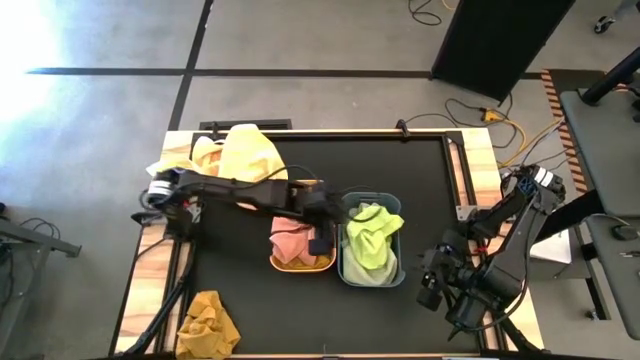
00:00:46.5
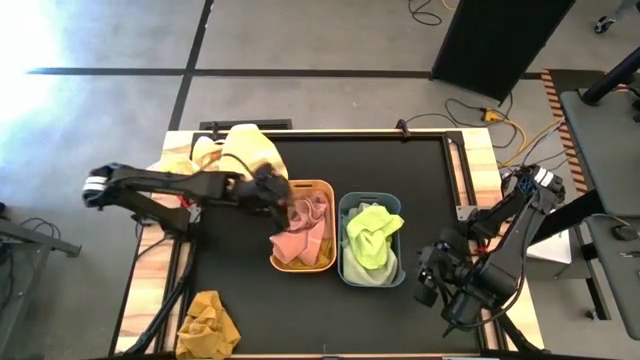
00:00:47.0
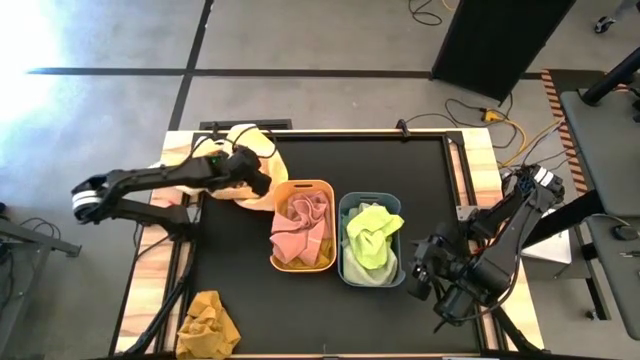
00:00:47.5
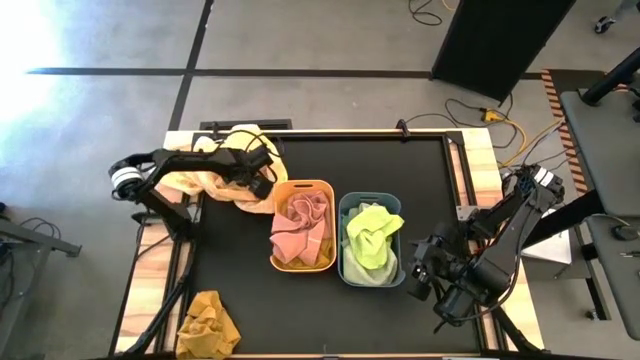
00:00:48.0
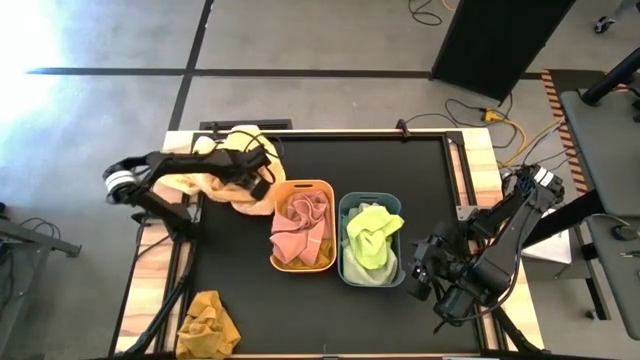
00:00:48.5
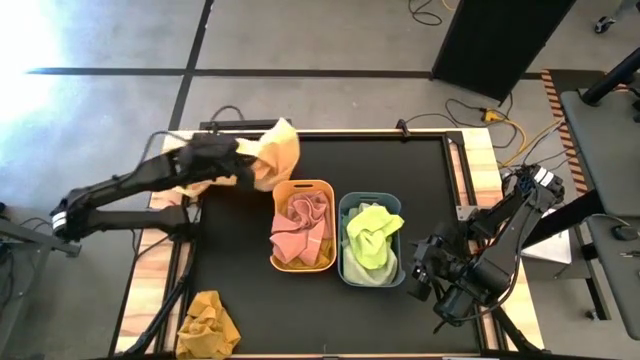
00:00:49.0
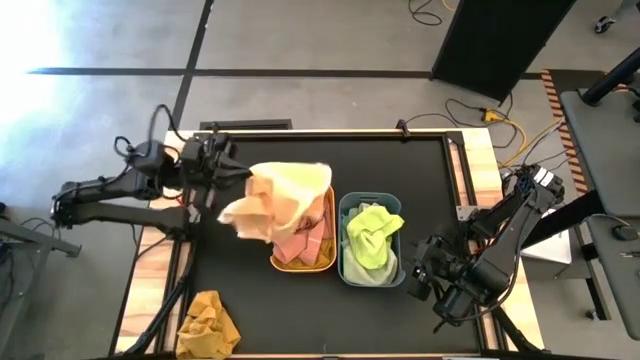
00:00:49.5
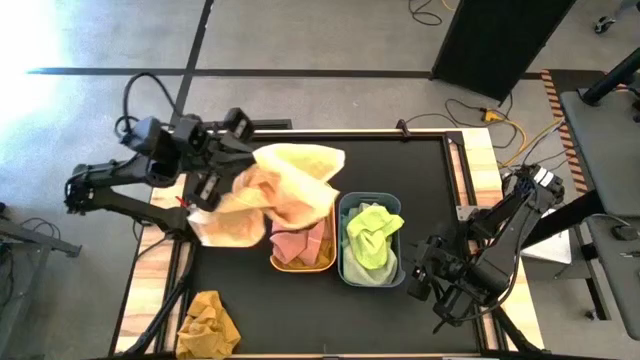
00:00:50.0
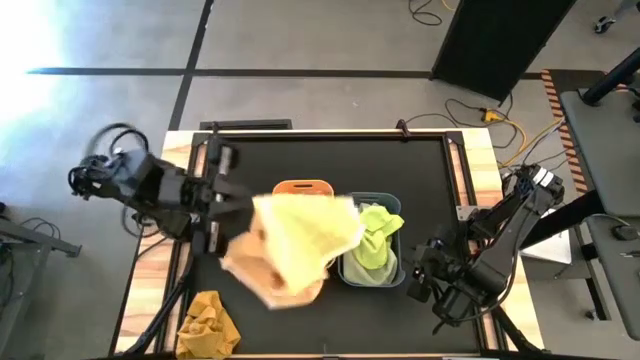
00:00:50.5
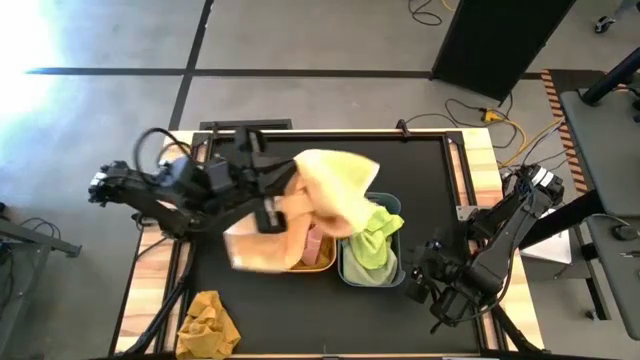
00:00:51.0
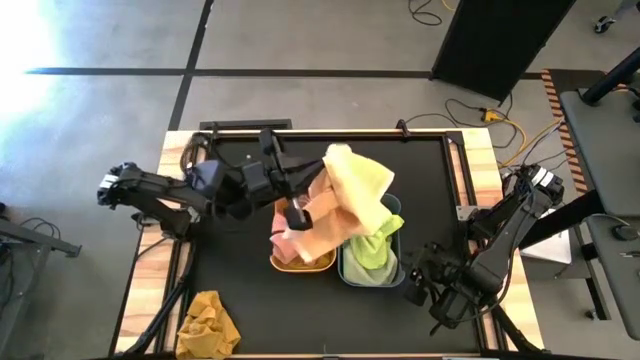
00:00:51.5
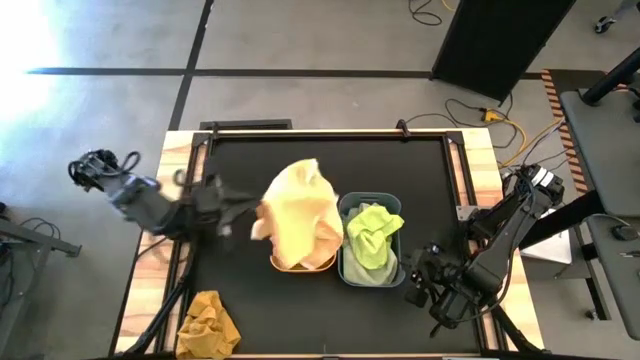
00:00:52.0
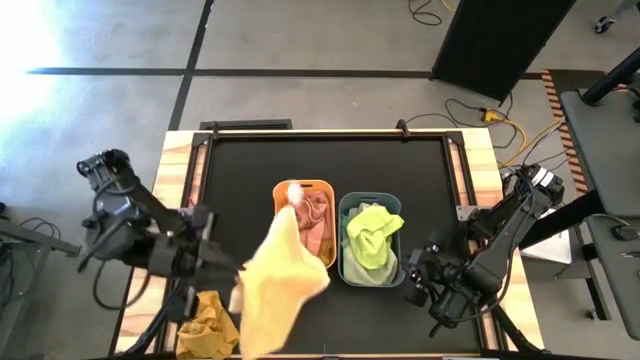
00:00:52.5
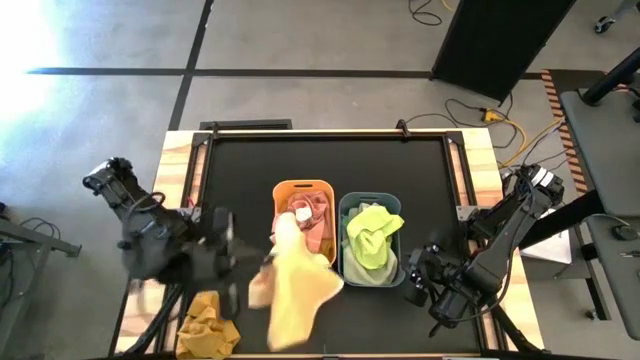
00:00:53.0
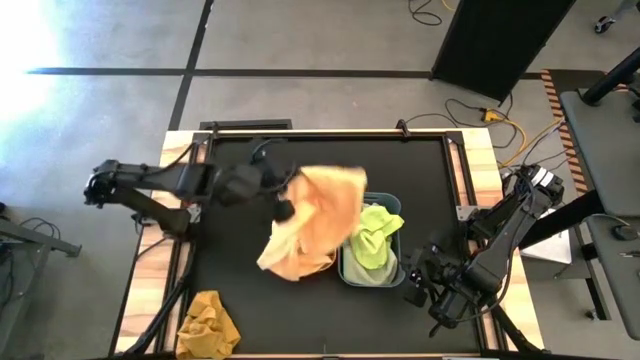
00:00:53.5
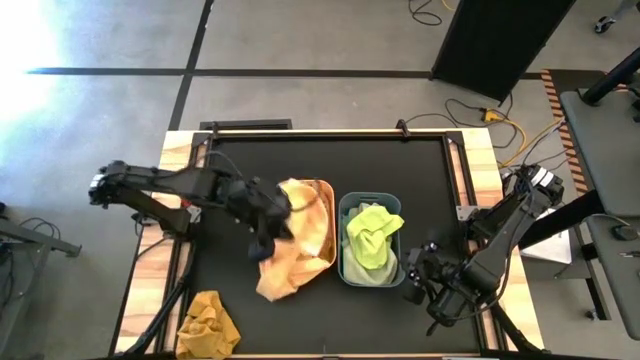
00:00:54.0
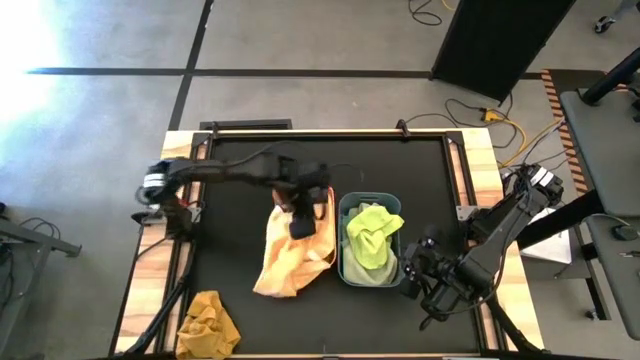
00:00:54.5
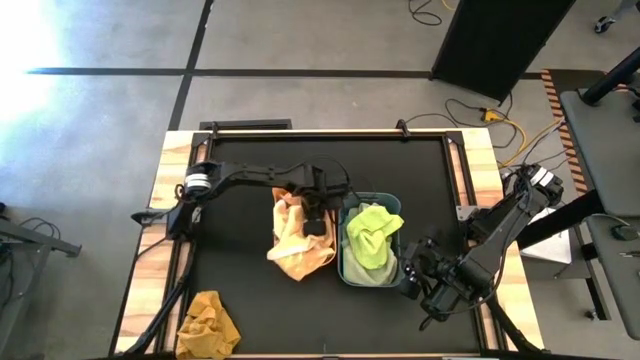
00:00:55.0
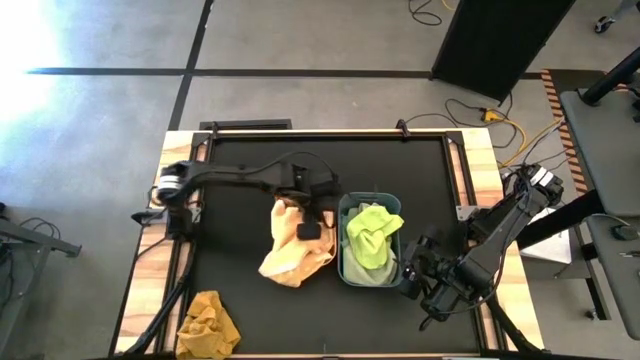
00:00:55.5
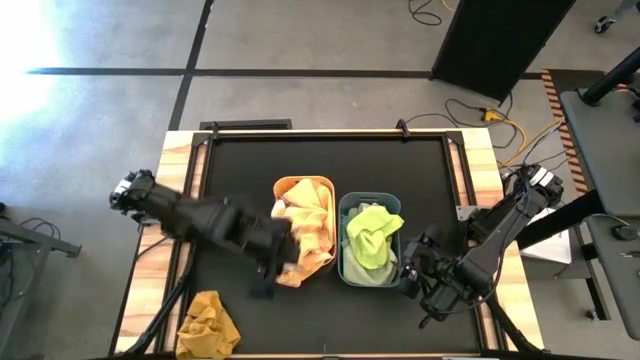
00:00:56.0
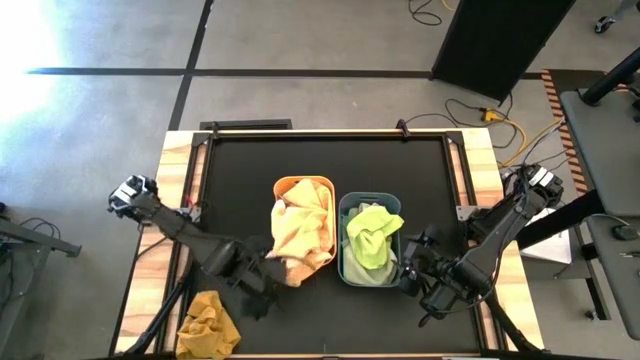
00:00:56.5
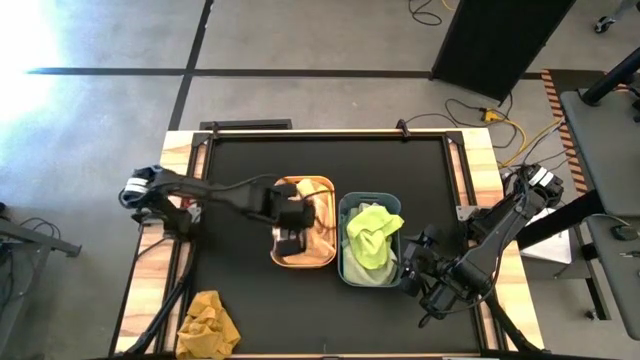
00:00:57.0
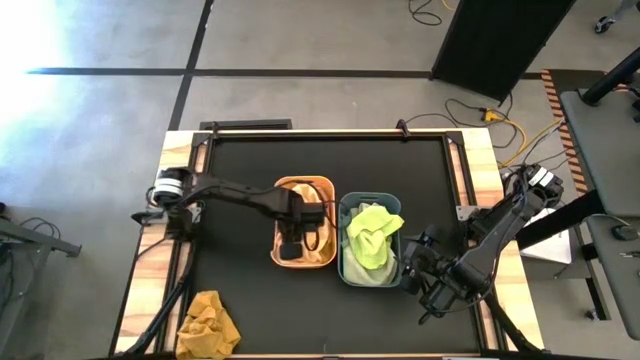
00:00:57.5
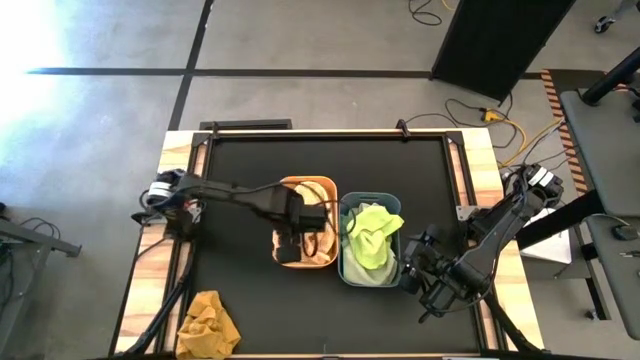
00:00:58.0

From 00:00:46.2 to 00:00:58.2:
Task: Sort towels by color in basket
Put the orange plaid towel into the orange bin

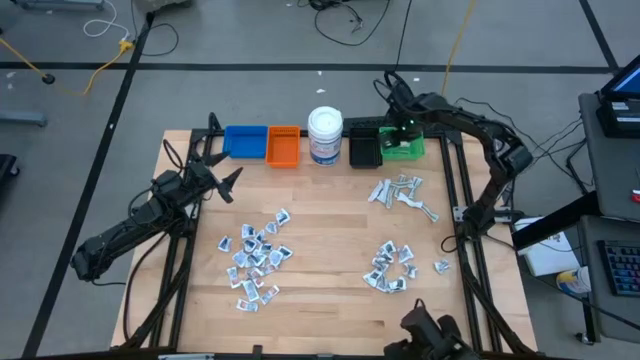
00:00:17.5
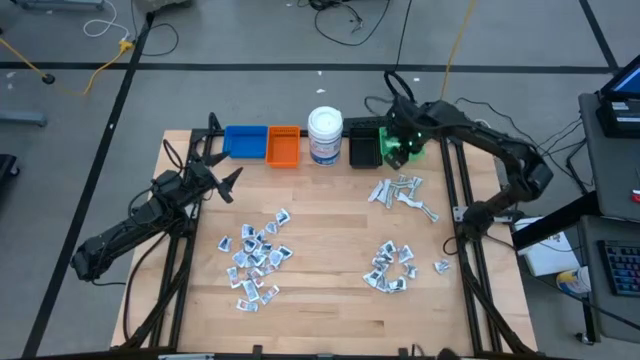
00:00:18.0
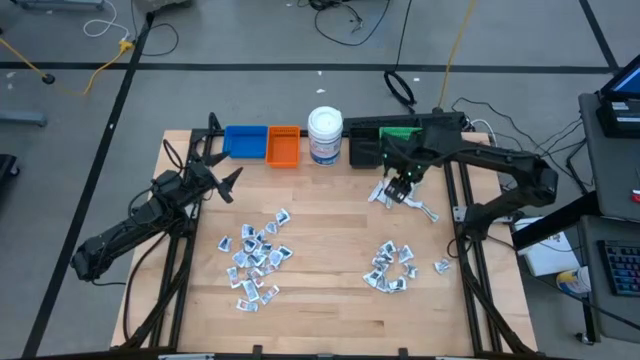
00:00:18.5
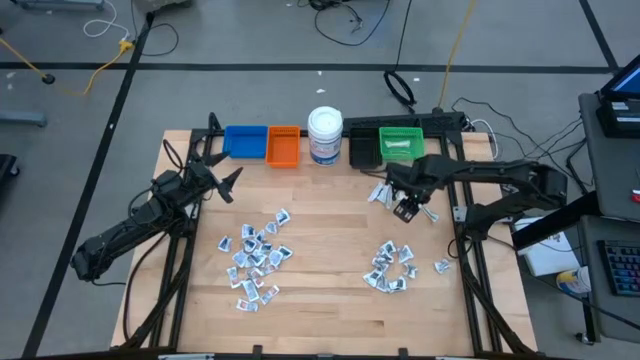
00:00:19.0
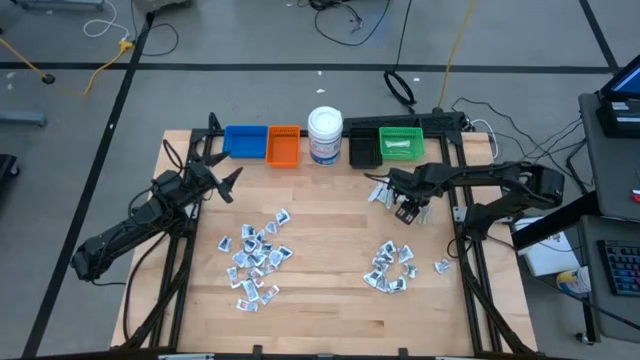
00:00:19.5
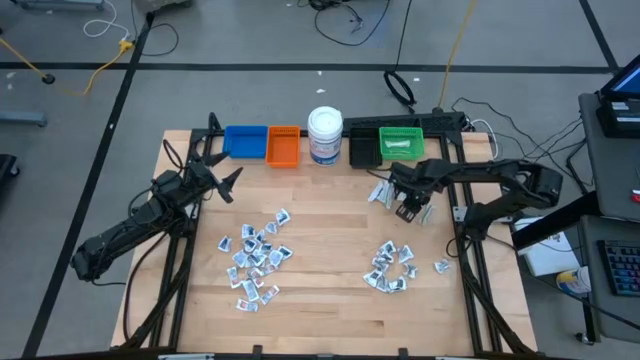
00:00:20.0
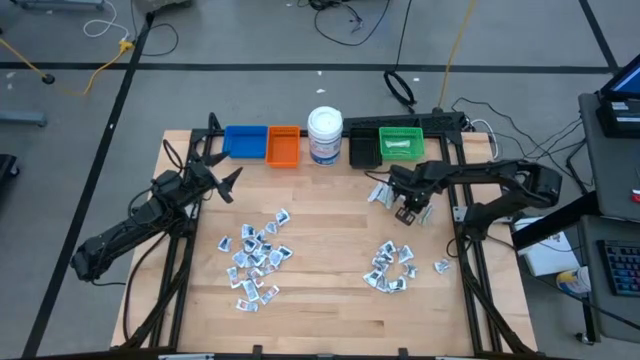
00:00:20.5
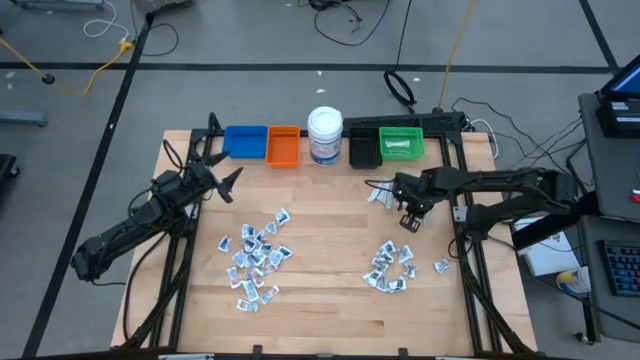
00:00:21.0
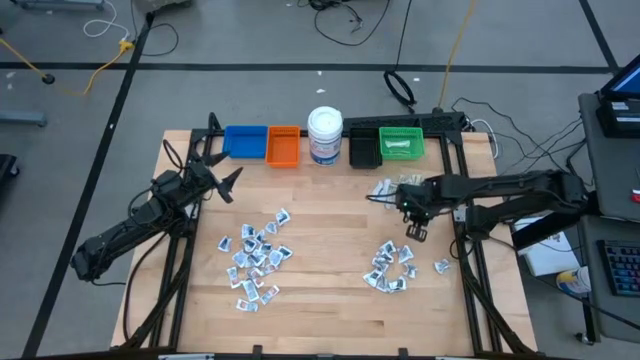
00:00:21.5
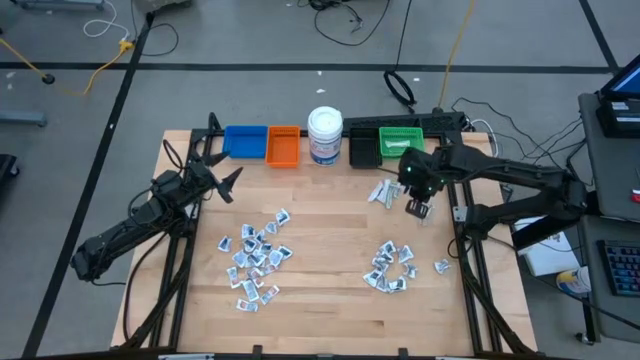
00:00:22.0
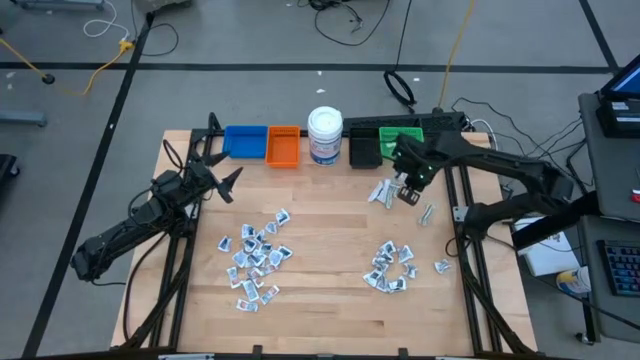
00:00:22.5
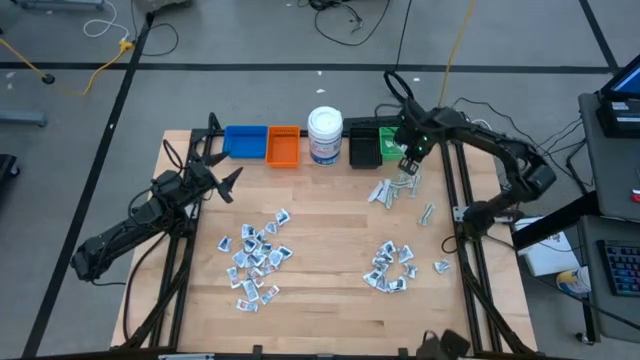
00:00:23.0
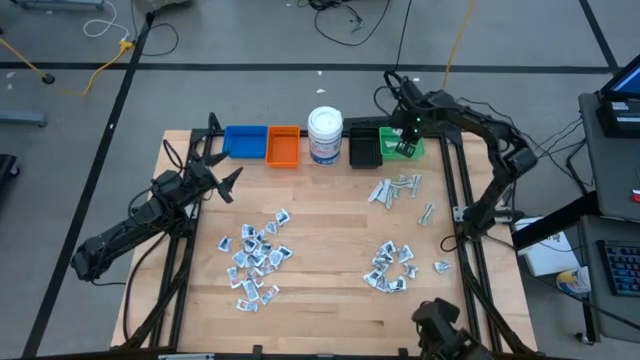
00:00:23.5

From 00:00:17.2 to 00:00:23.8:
Task: Pick & Place First Aid Supplies
Put the bandage into the green bin

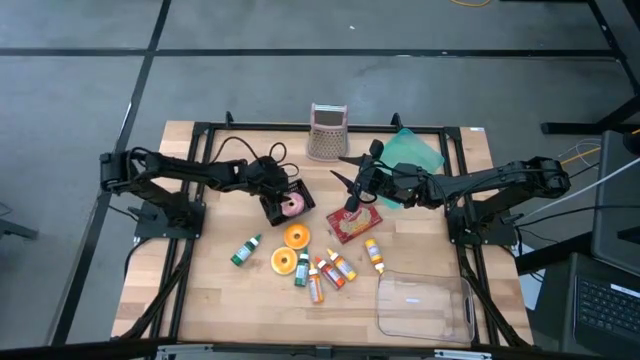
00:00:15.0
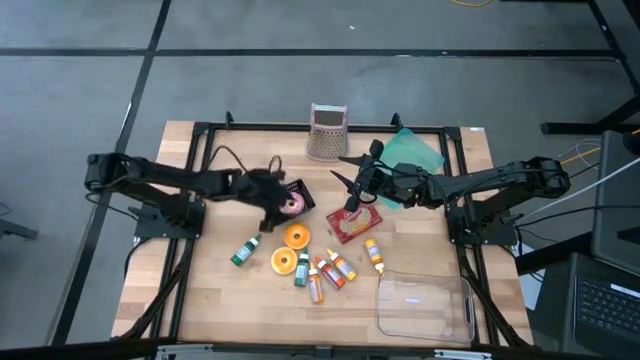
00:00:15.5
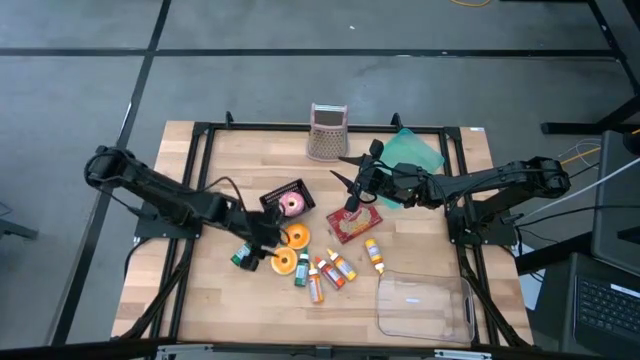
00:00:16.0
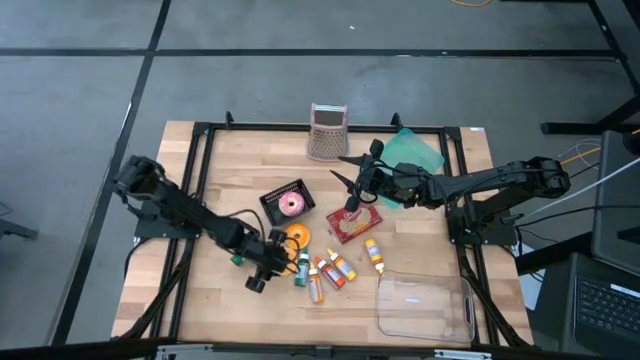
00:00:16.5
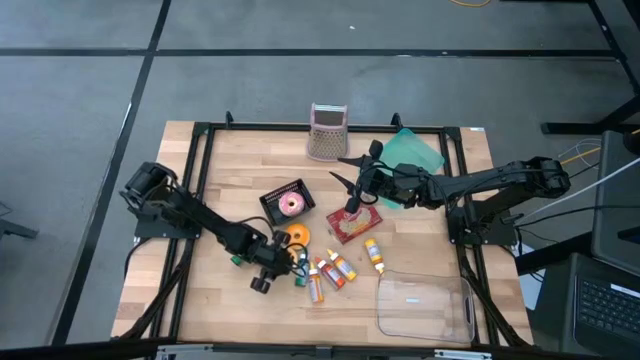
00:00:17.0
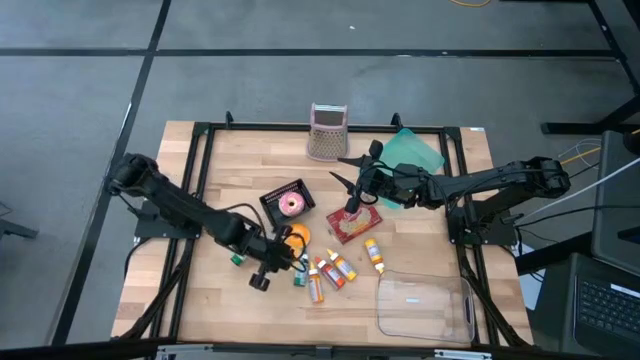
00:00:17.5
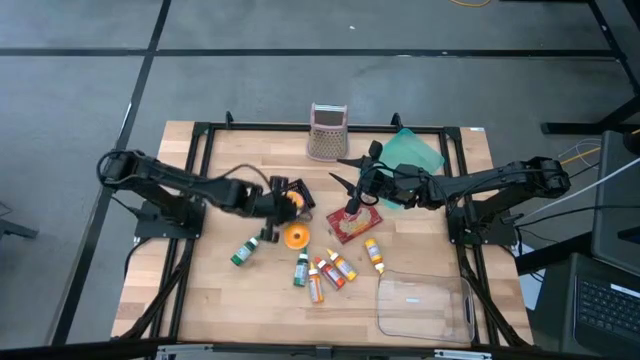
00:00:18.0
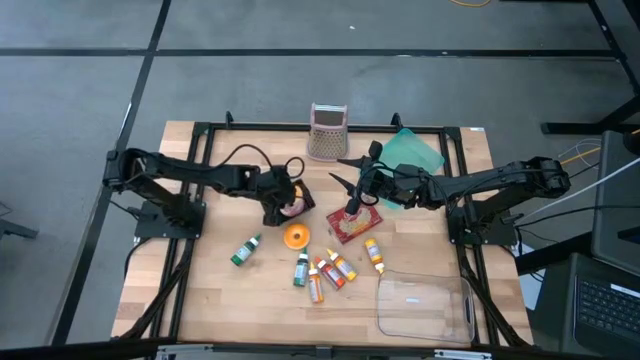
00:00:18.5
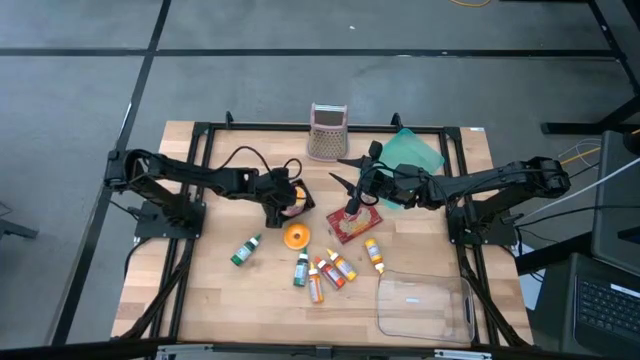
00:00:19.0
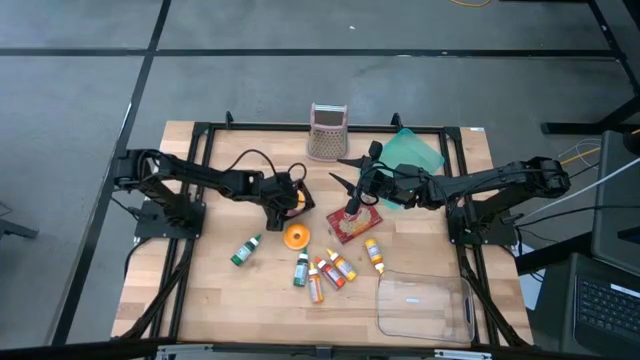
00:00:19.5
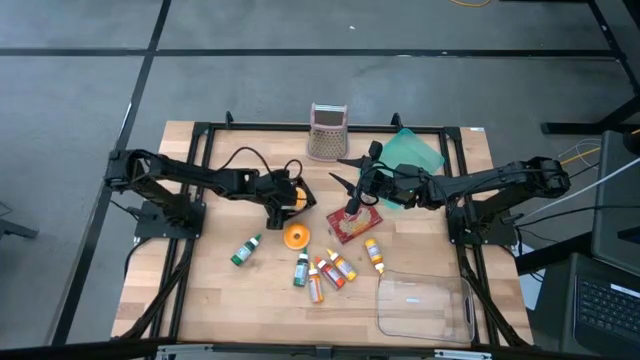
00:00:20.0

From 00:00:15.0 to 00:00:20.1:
Task: Pick & Place Food Item
Put the bottom yellow donut into the black bin
